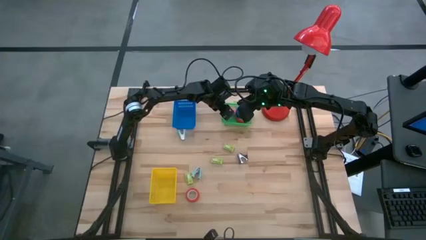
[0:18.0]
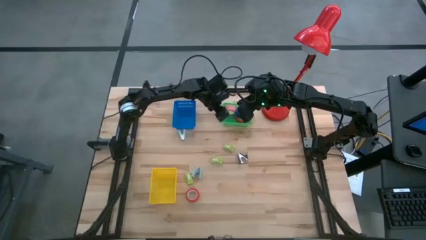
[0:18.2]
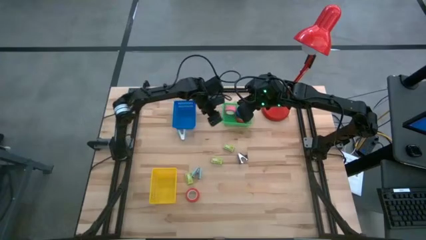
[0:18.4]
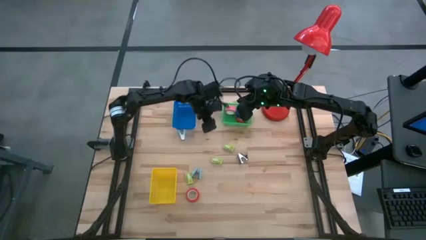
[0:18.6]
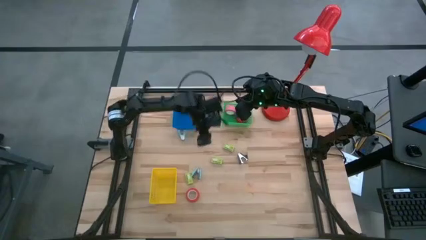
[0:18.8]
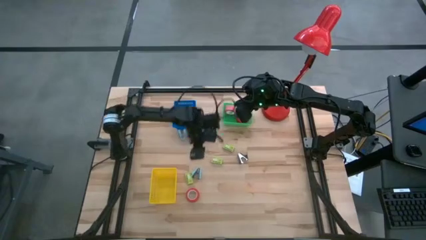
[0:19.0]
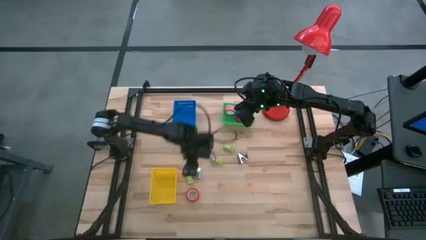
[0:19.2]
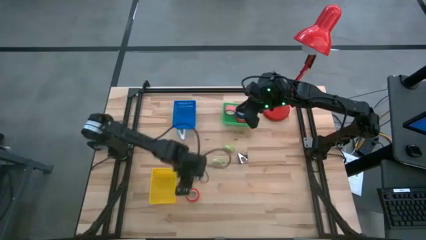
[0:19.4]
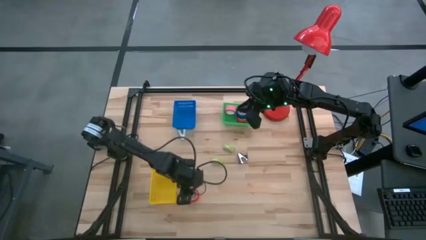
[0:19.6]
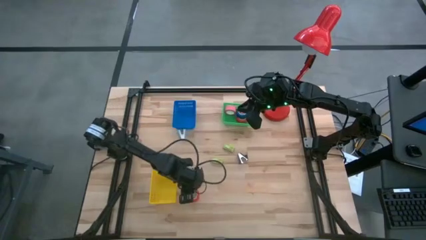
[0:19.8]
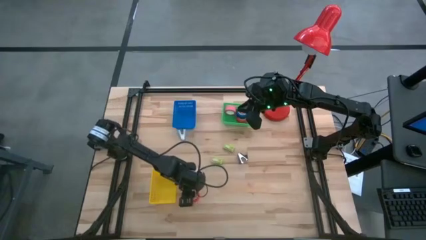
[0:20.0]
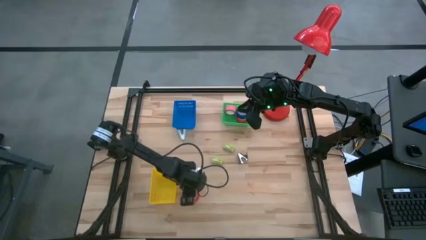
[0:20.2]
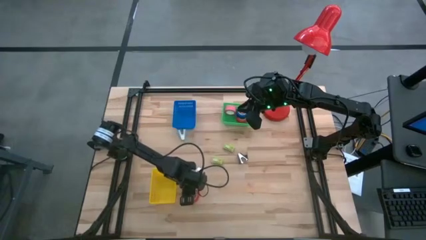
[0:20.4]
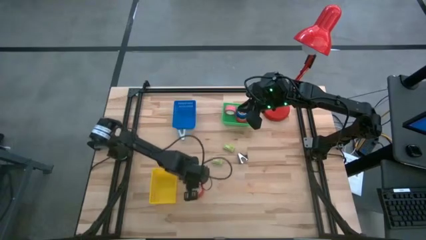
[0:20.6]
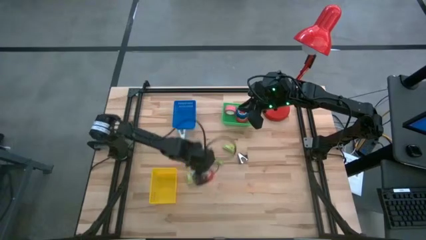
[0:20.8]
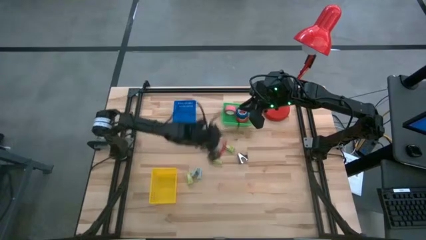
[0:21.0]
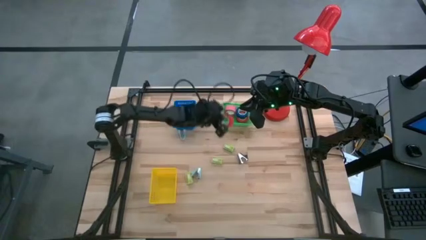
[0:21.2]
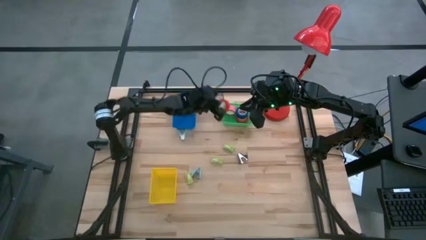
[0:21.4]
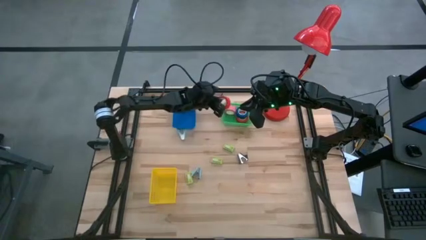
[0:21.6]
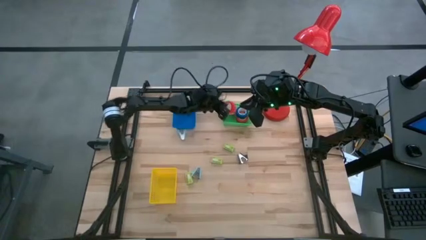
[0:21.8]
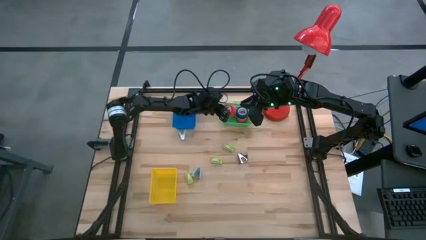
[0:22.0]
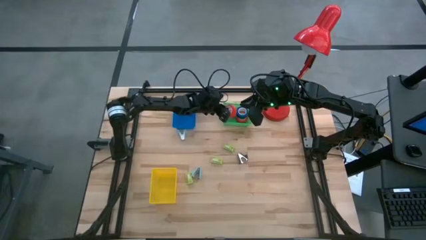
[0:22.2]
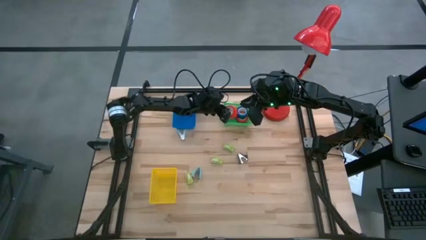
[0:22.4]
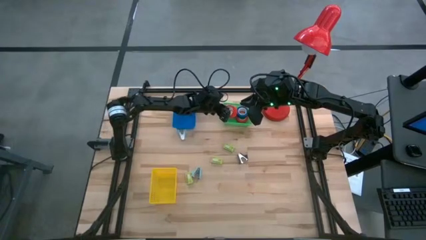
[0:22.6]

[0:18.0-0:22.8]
Task: Pick and place Stapler, Stapler remover, tape
Put the orange tape into the green basket

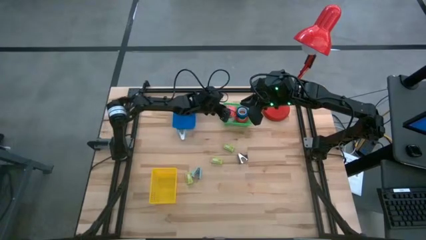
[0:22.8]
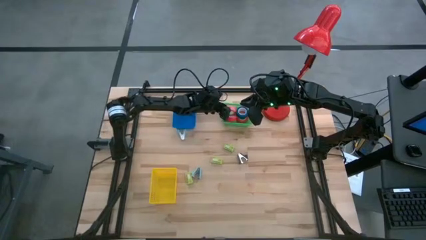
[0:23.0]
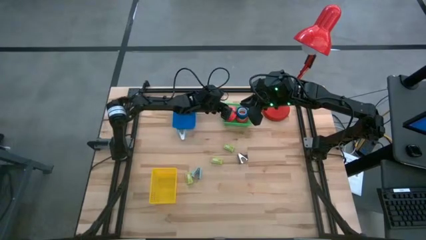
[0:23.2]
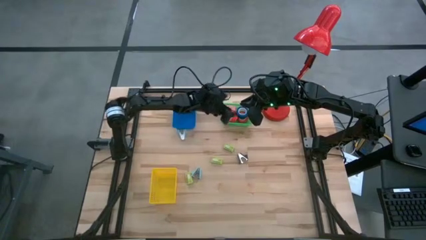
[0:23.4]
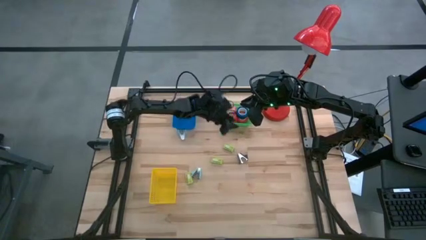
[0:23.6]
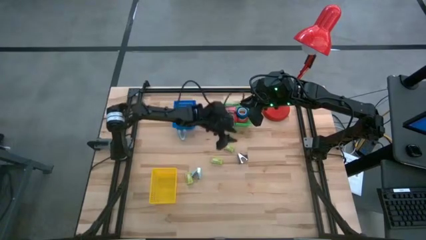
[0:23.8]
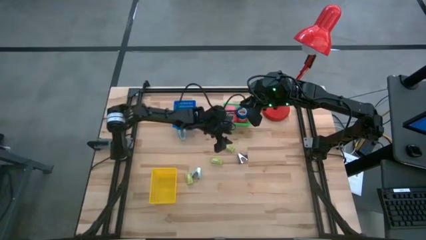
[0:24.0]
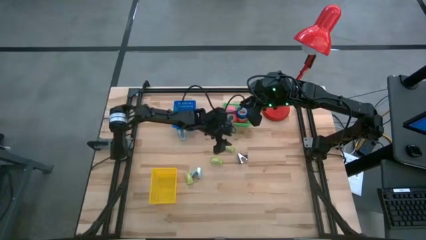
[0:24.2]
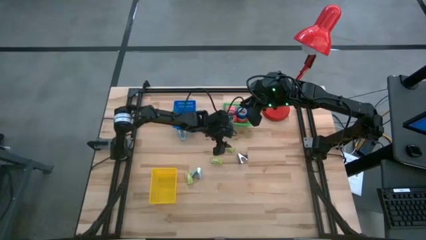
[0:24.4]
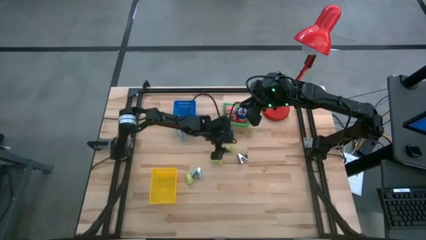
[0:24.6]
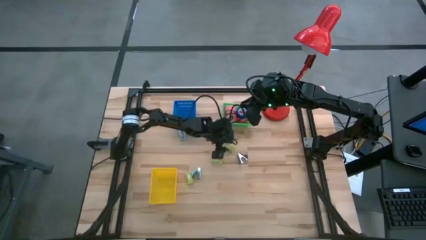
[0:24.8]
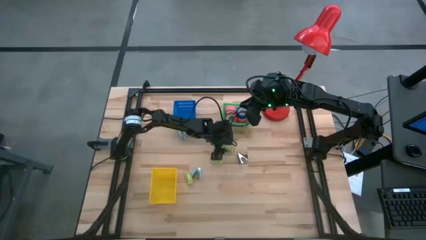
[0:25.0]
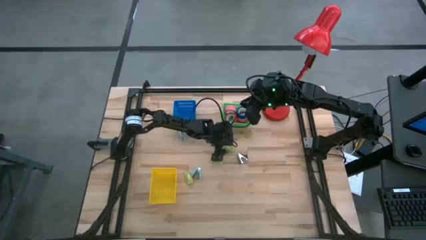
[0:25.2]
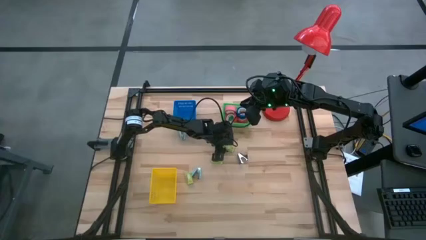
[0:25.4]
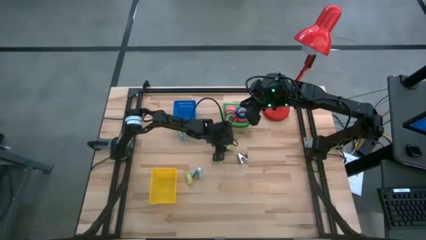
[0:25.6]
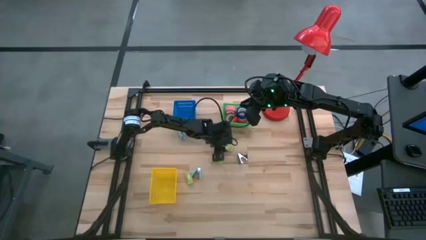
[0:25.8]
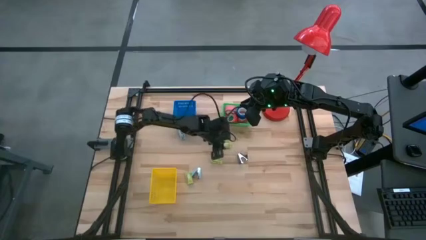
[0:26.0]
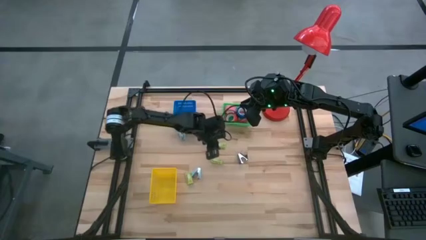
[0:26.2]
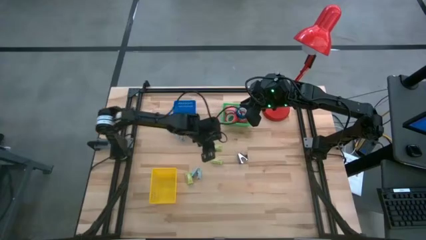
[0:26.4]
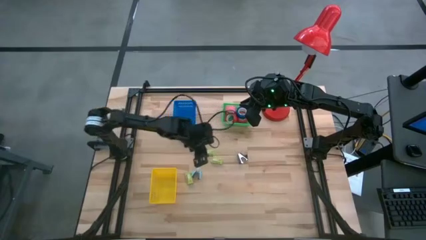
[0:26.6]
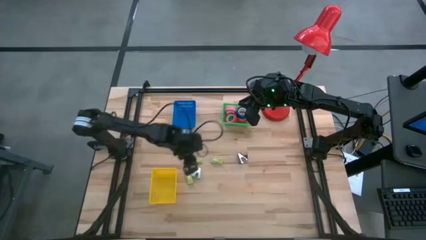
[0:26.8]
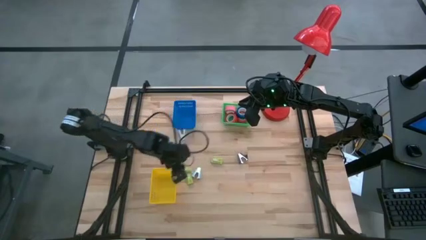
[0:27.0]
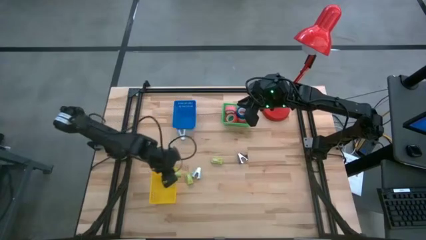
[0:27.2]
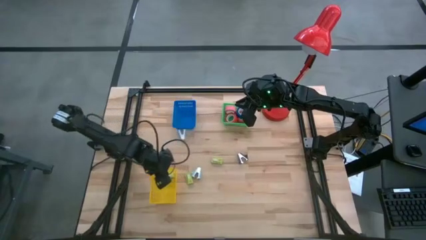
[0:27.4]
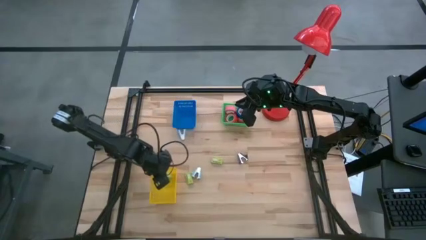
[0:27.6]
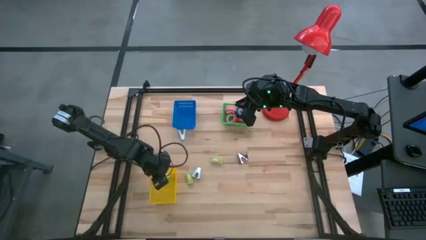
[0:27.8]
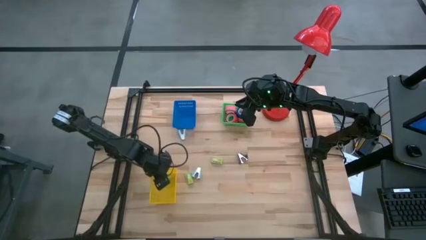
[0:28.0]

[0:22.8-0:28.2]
Put the top green staple pins into the yellow basket

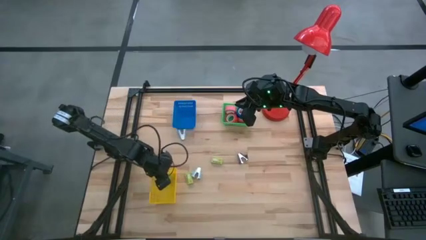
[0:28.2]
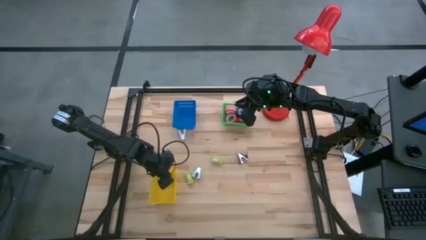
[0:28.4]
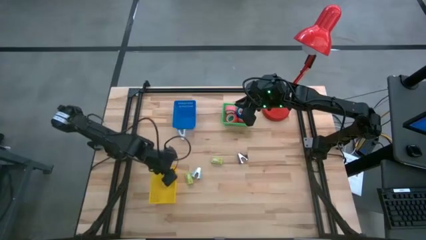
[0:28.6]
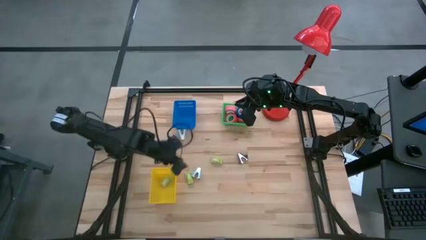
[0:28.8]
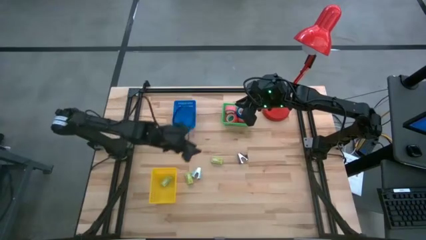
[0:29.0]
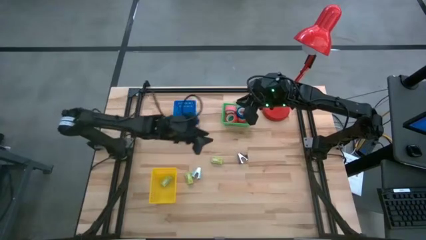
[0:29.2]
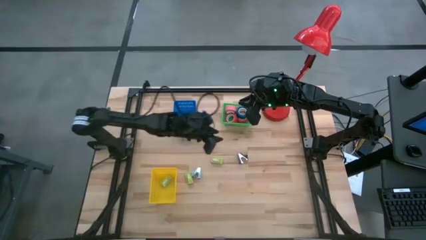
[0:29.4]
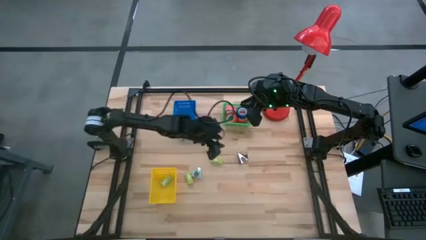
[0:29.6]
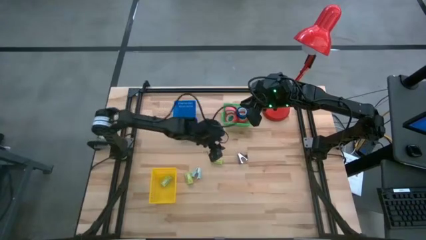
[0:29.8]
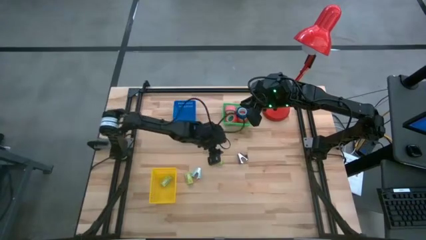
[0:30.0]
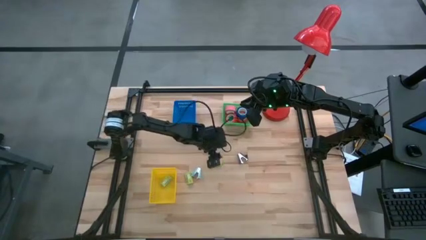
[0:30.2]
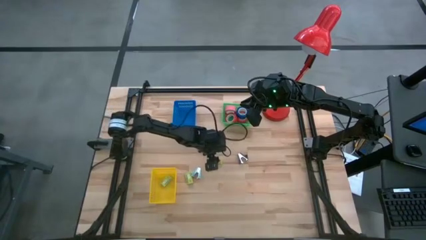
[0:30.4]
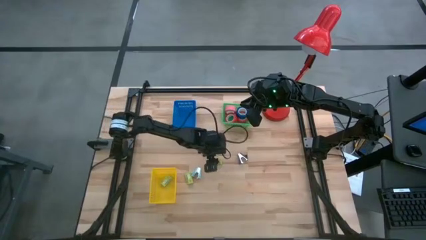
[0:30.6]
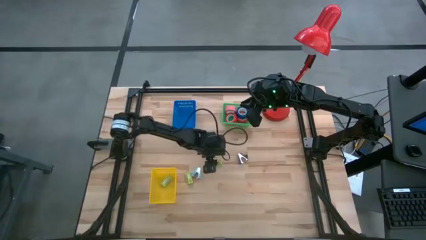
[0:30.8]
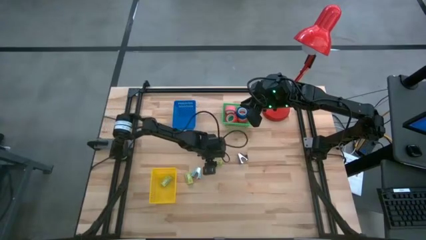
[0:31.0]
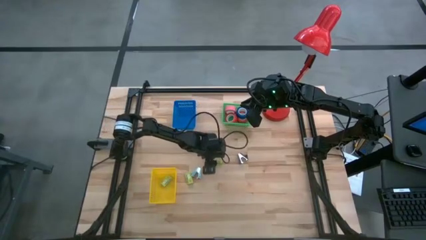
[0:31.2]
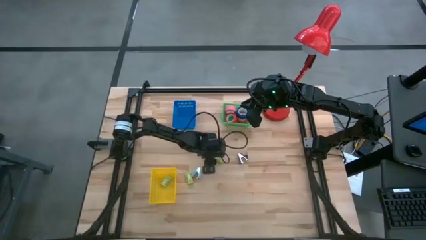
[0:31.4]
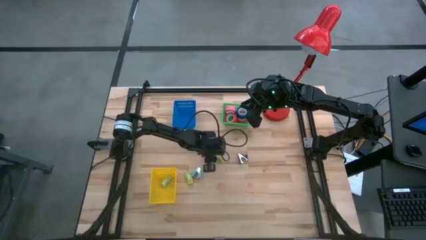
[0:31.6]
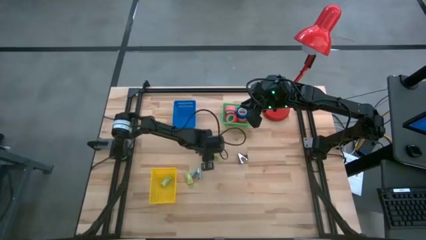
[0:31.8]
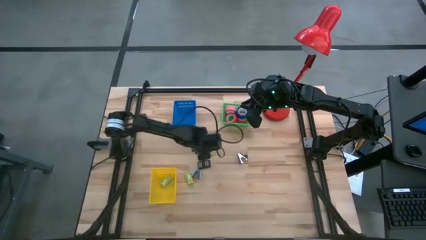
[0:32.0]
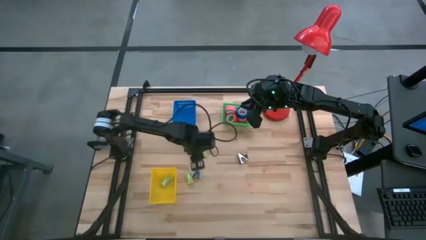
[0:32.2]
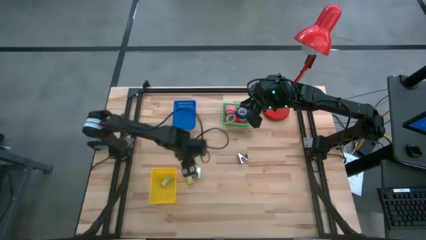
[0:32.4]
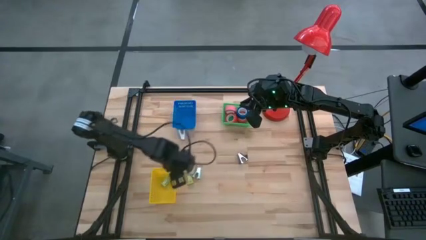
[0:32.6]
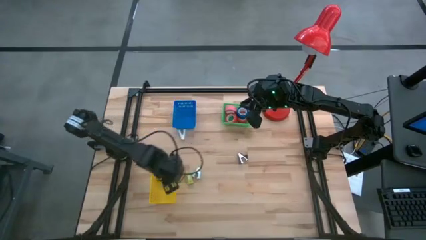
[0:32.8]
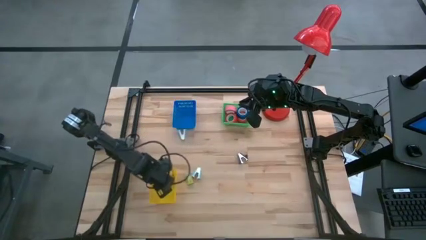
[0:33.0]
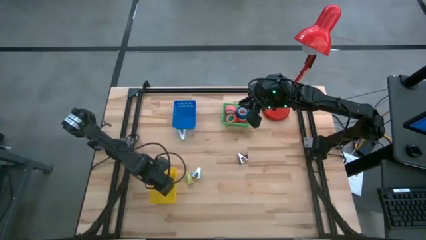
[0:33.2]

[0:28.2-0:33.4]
Put the top green staple pins into the yellow basket

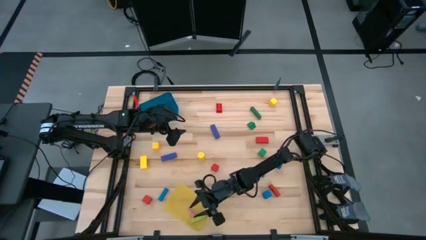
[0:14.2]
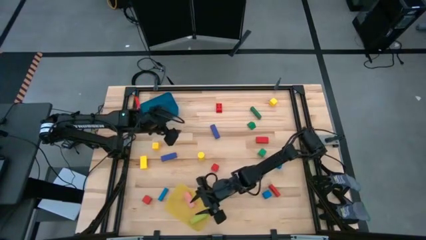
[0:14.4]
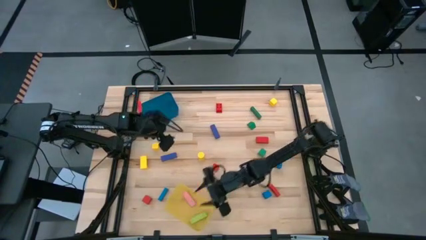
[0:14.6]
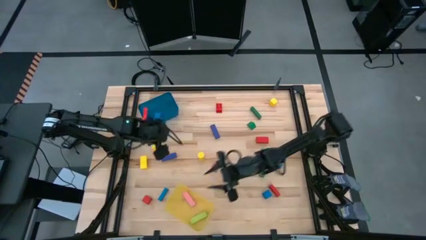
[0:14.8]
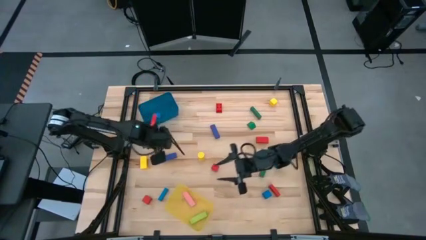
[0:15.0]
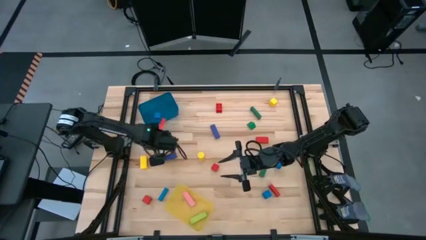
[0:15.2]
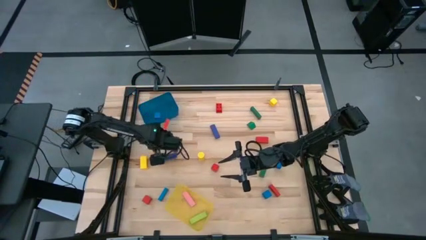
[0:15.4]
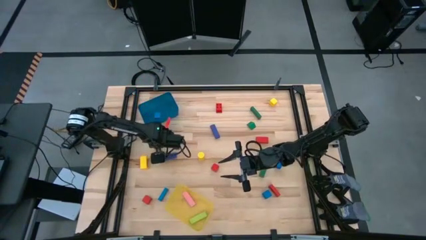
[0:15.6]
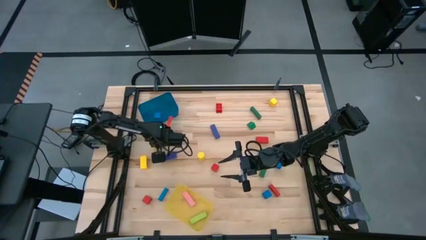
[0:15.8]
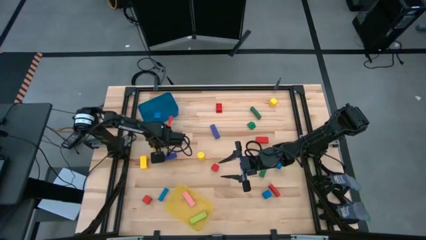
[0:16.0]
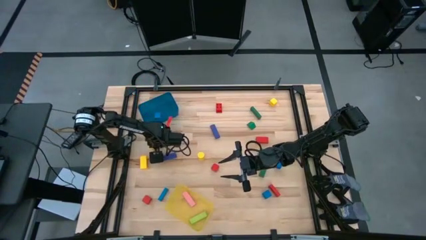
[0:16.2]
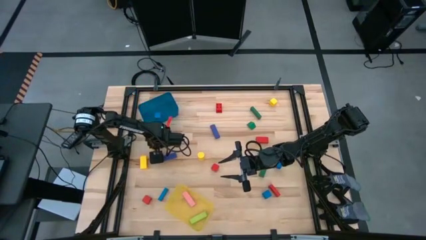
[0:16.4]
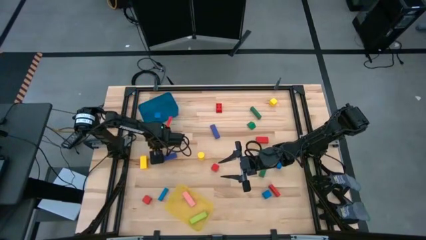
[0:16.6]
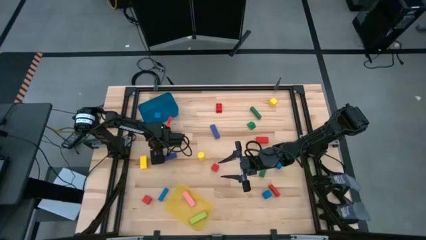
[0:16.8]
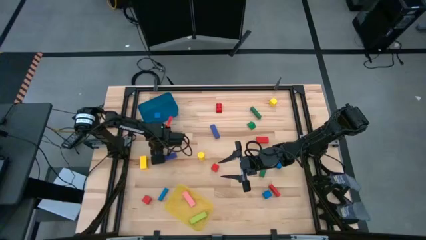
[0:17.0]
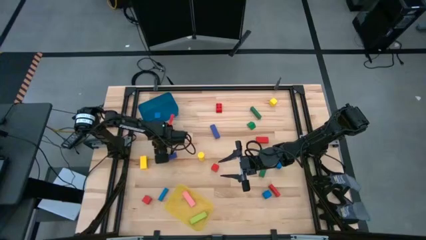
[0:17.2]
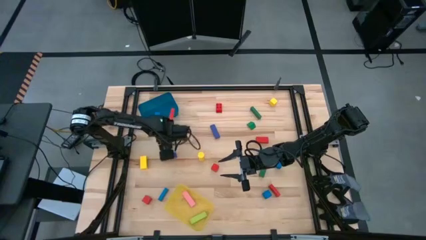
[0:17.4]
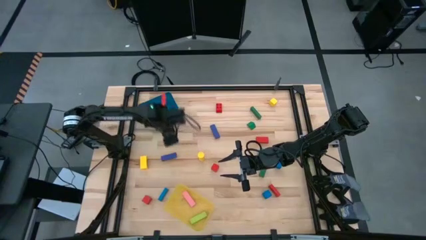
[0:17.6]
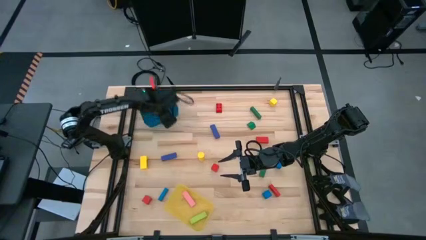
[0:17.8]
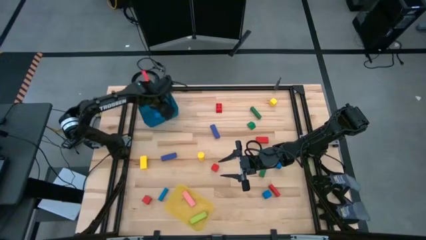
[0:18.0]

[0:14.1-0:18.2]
Task: Sort blocks by size
Put the bottom small yellow block into the blue bin
